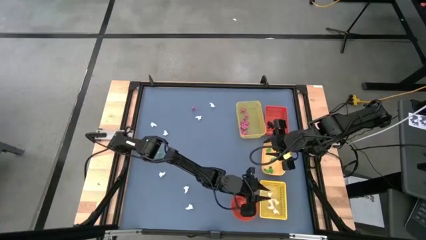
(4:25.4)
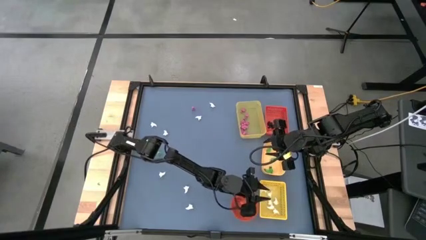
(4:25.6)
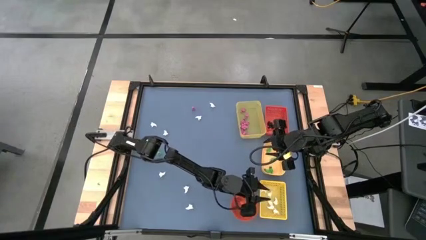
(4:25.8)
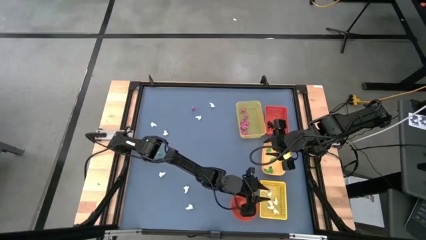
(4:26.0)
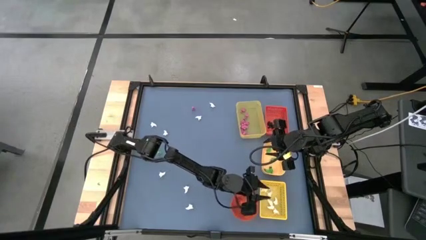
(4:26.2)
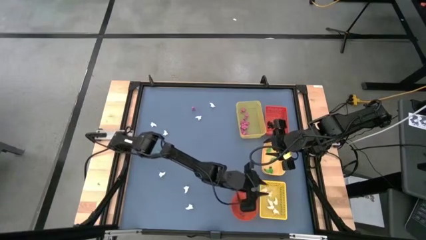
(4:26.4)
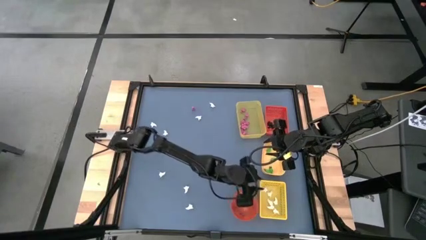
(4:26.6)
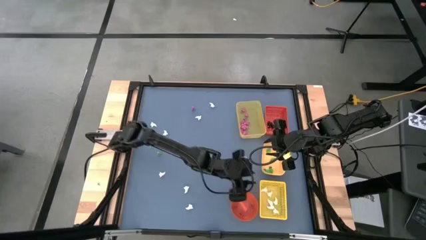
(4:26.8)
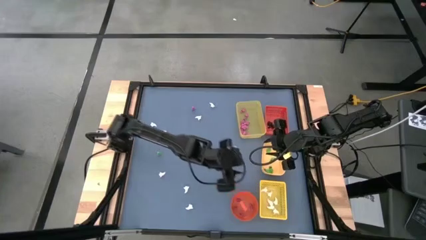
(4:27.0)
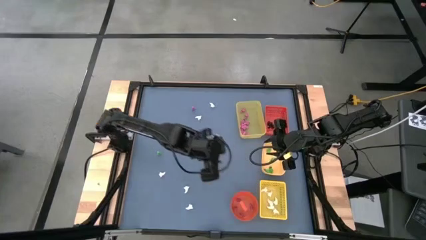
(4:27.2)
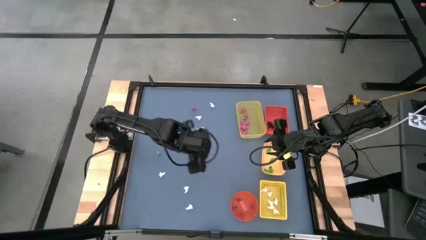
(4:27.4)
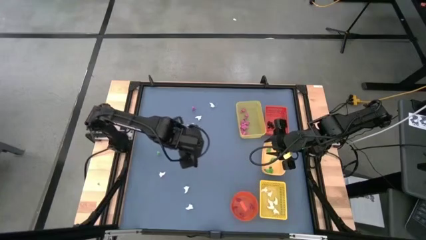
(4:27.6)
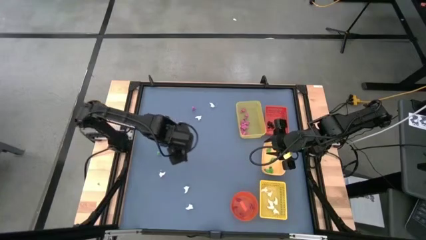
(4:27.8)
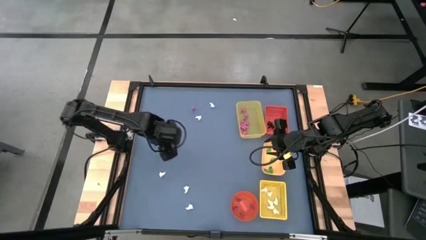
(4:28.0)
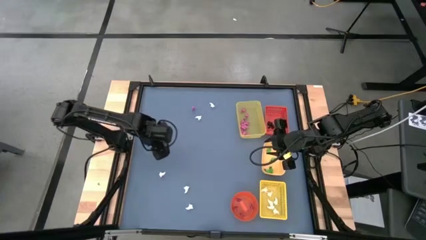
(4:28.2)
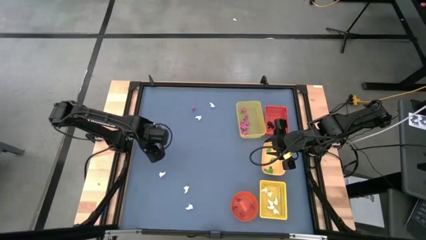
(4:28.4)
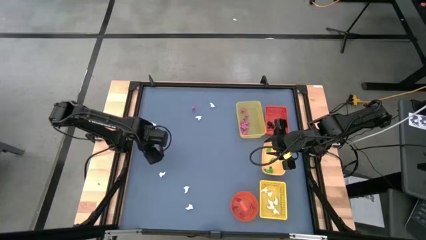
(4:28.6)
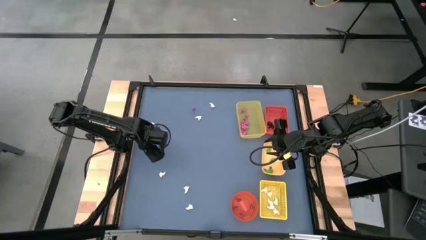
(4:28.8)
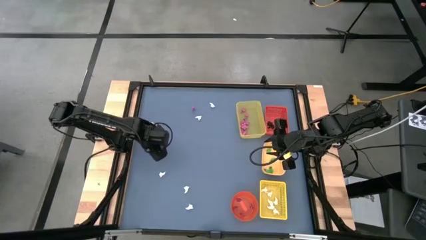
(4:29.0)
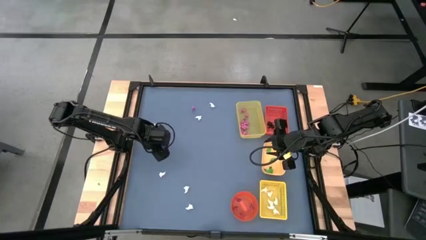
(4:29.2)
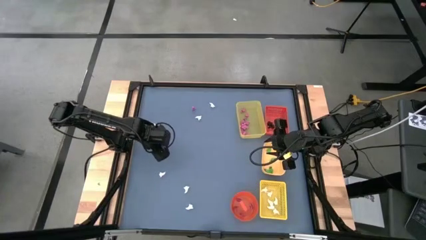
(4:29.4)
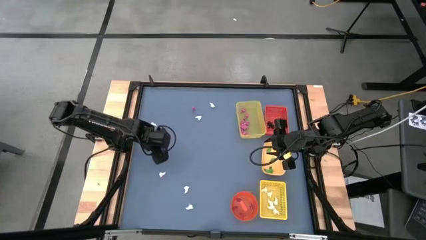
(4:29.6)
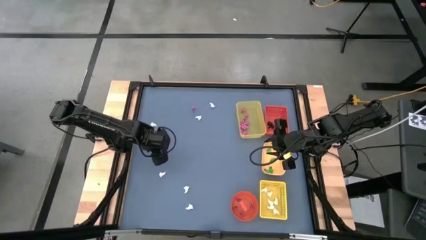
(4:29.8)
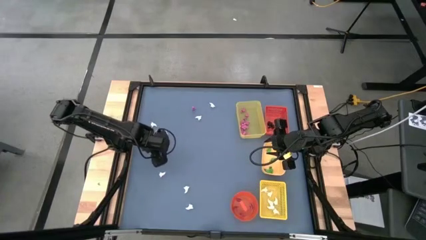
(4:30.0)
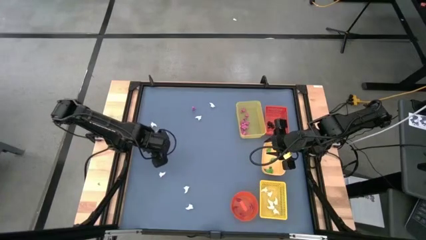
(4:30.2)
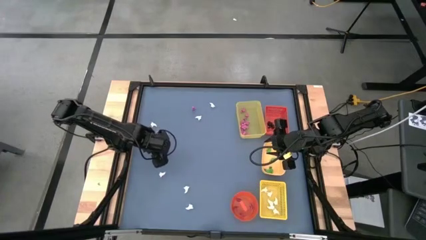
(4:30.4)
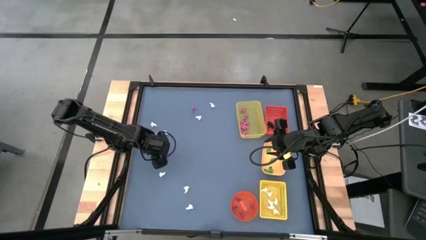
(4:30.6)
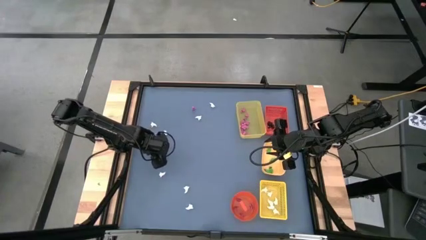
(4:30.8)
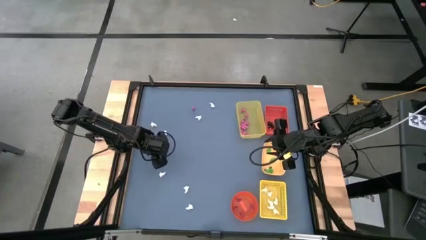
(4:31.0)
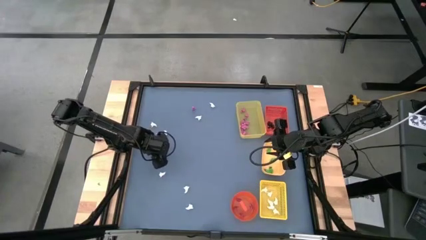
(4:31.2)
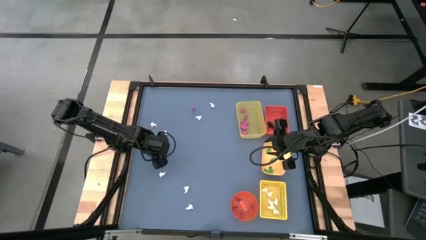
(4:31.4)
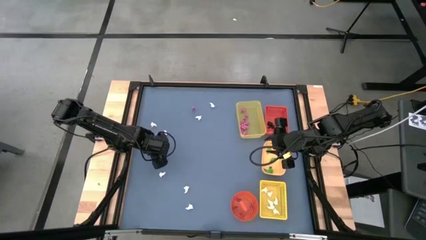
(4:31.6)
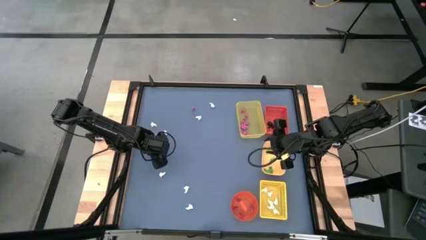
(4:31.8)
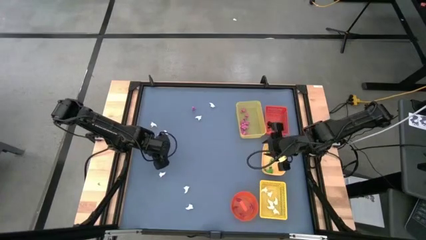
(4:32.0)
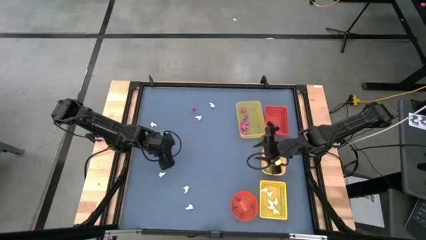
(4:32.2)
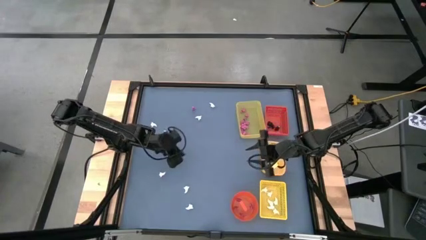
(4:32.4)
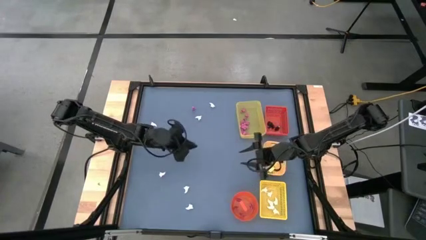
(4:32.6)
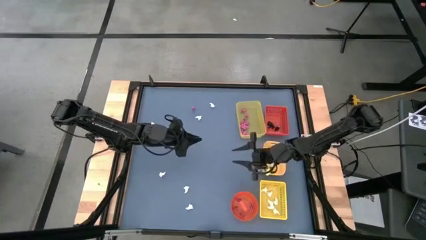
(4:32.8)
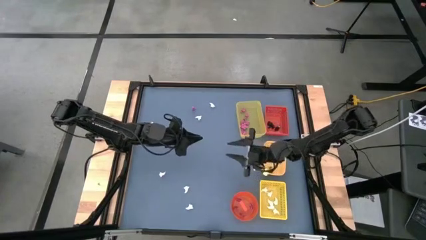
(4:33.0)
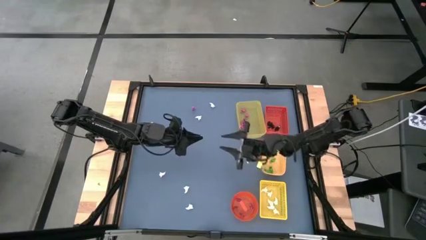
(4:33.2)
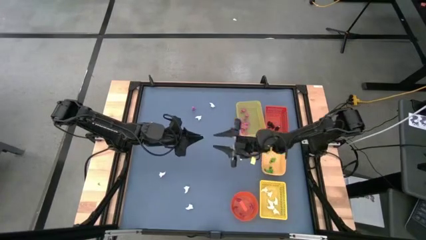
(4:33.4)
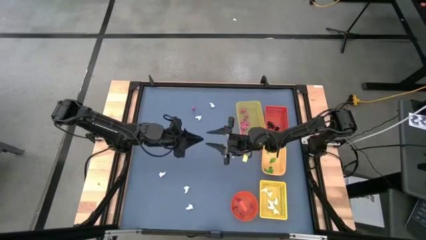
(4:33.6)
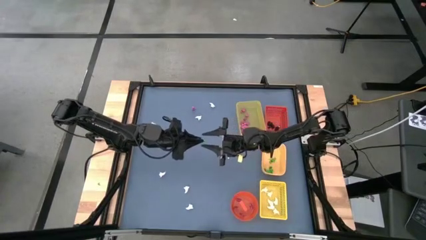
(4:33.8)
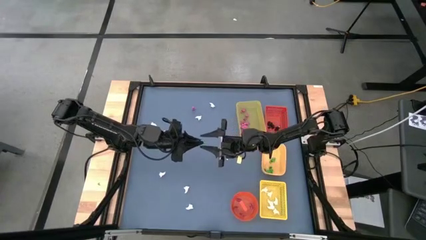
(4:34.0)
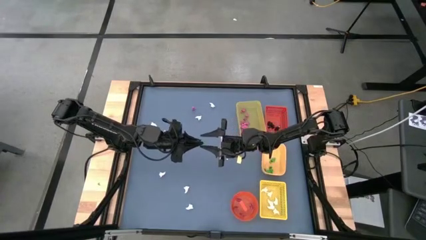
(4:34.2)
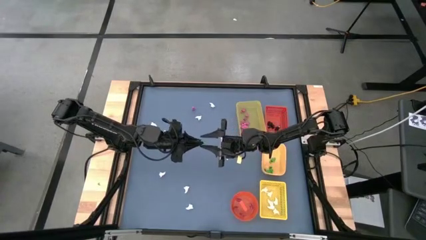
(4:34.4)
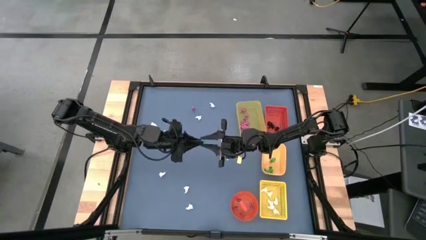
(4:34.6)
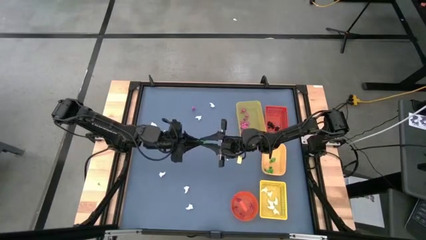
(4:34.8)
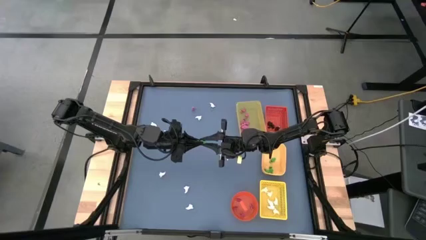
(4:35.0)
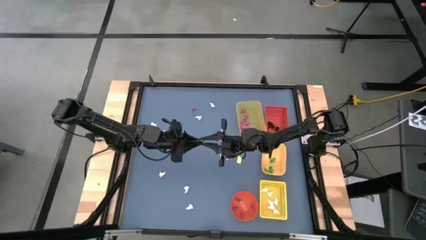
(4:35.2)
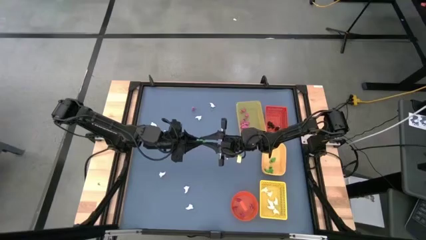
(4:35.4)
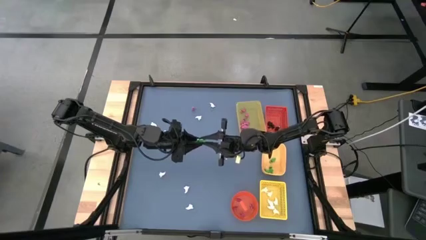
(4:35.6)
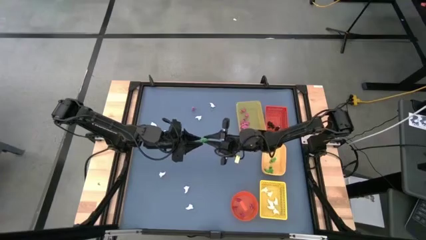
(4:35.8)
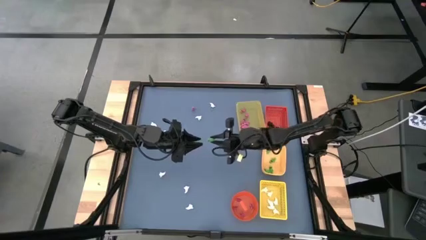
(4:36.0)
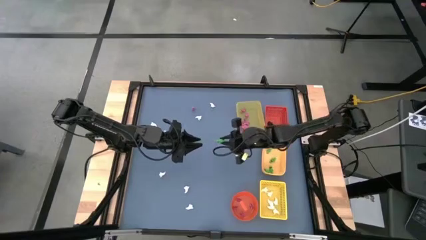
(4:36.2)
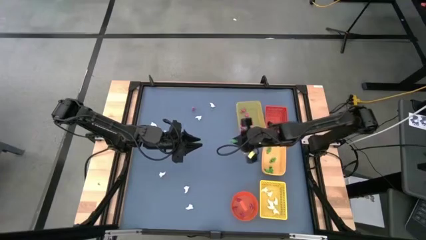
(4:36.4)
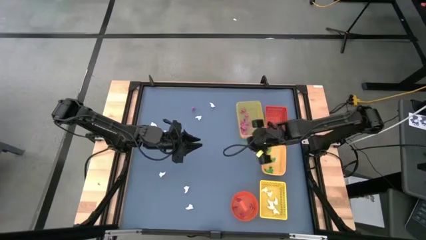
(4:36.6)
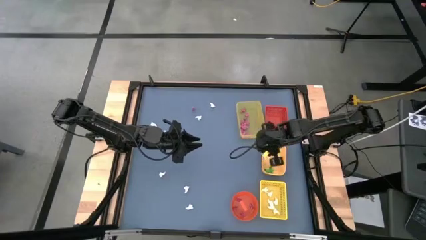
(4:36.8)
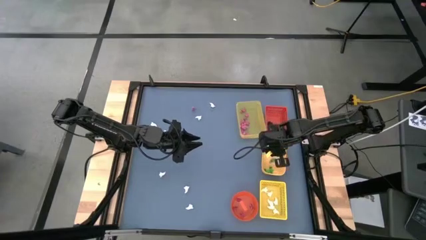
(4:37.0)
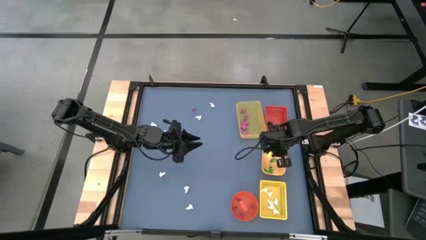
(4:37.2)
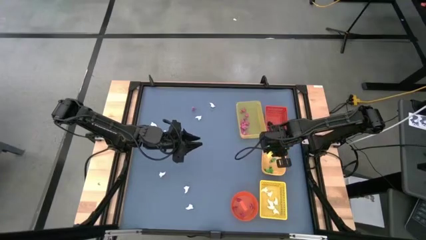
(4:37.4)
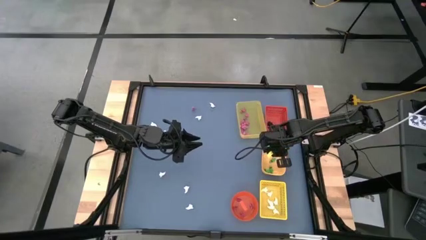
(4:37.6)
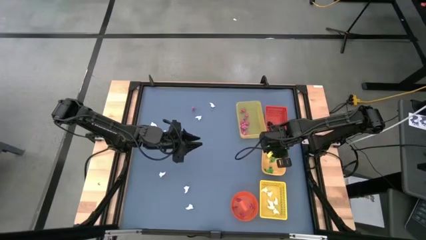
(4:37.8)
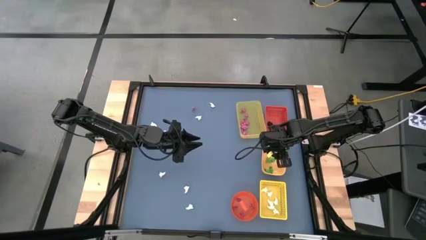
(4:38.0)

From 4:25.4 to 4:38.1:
Task: Sort Halloween decoration
Put the green skeleton toy into the middle yellow bin
